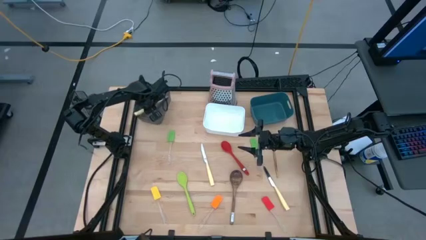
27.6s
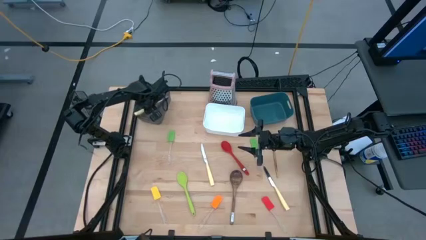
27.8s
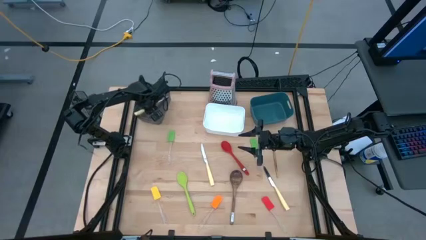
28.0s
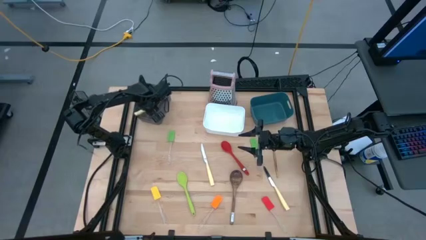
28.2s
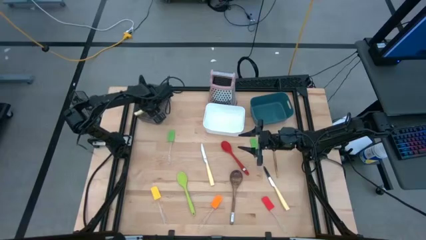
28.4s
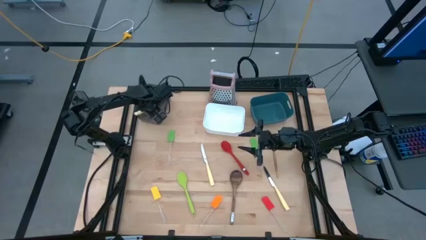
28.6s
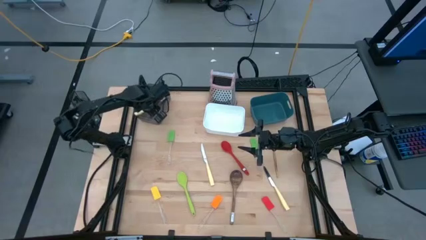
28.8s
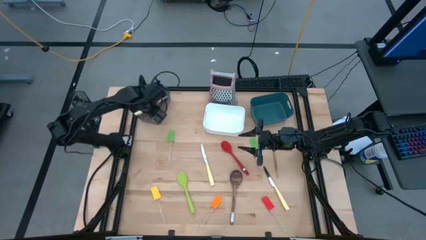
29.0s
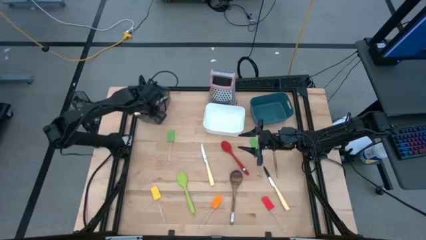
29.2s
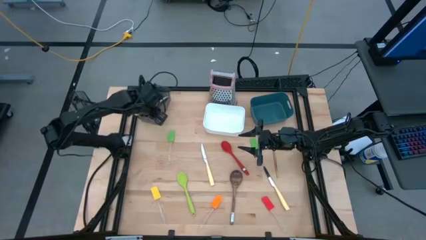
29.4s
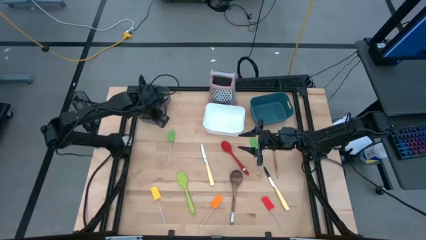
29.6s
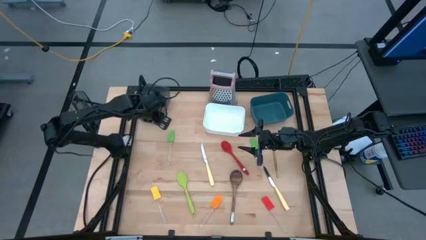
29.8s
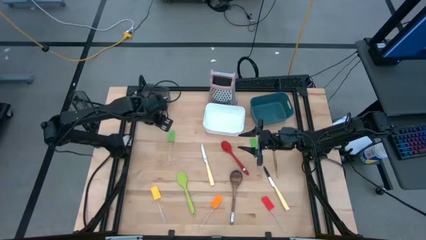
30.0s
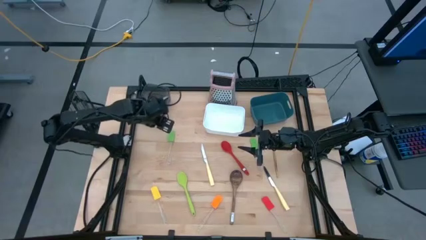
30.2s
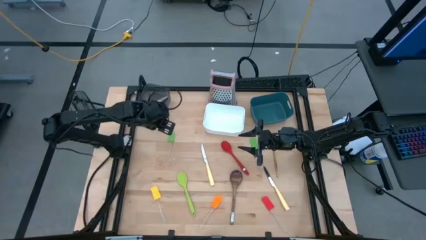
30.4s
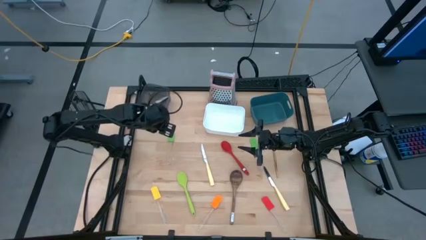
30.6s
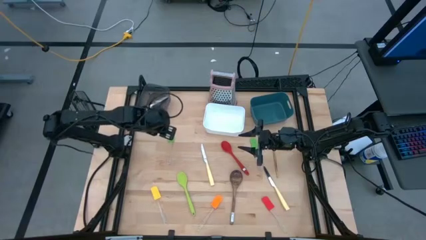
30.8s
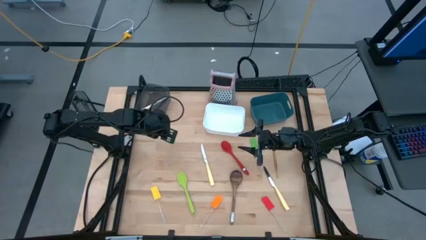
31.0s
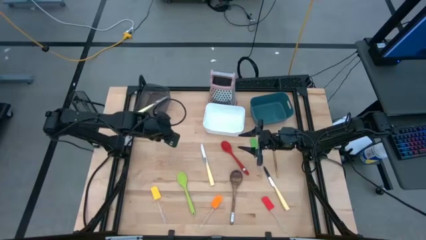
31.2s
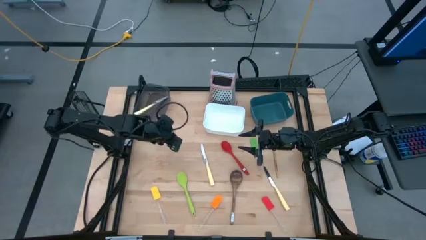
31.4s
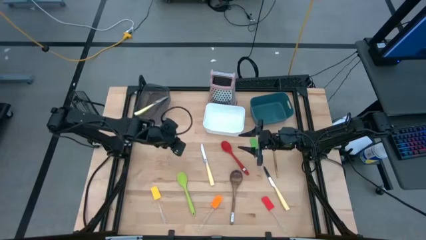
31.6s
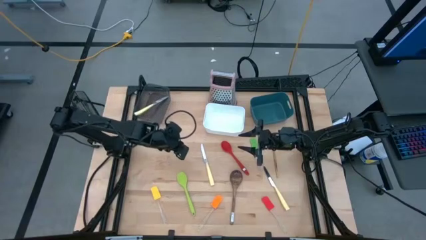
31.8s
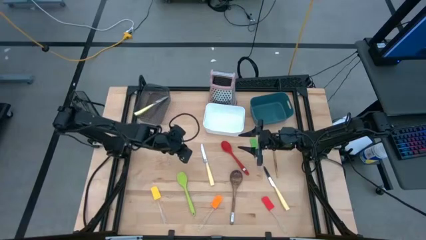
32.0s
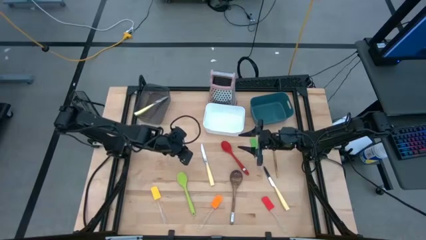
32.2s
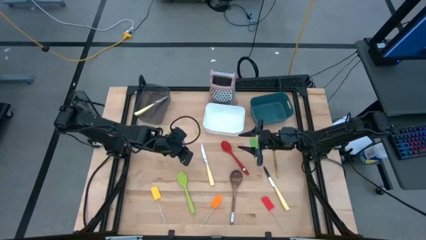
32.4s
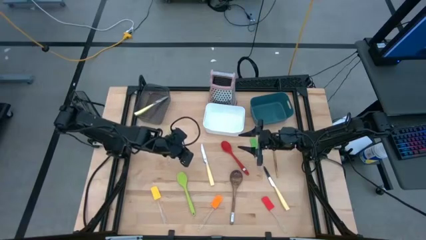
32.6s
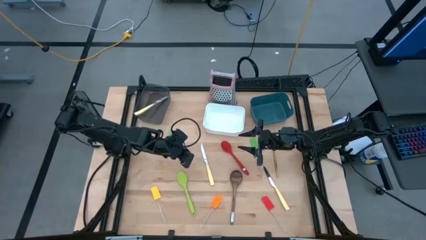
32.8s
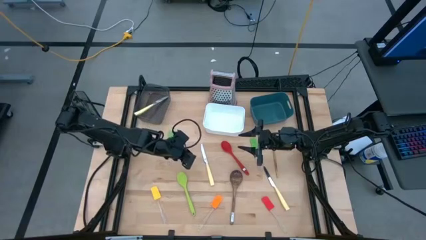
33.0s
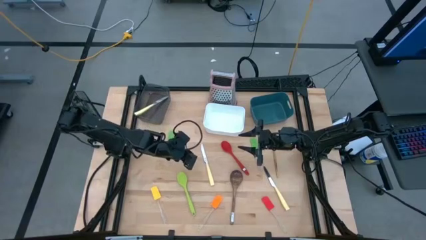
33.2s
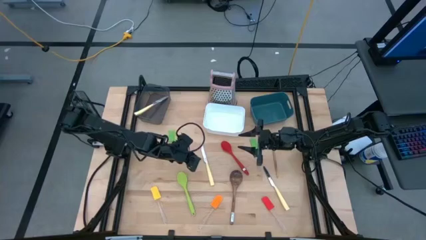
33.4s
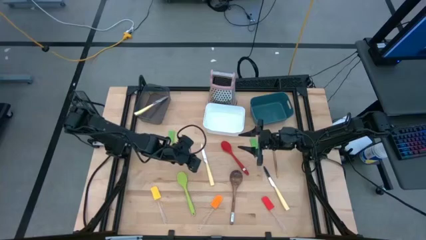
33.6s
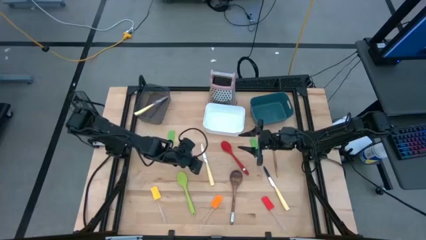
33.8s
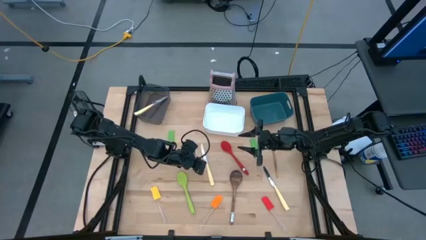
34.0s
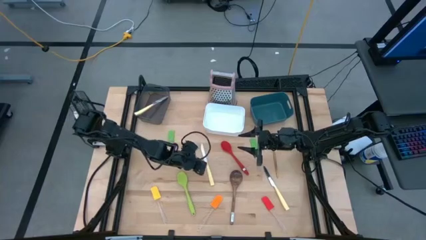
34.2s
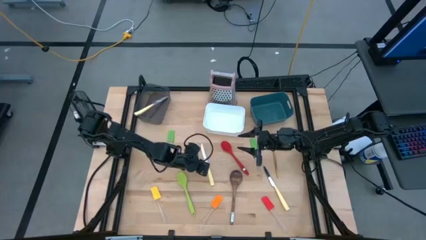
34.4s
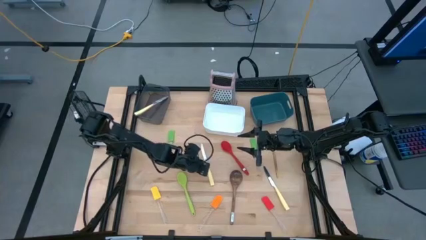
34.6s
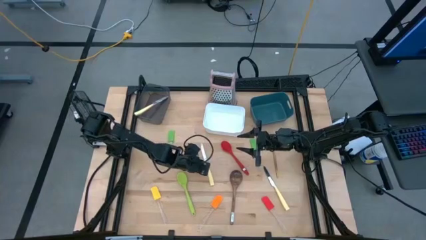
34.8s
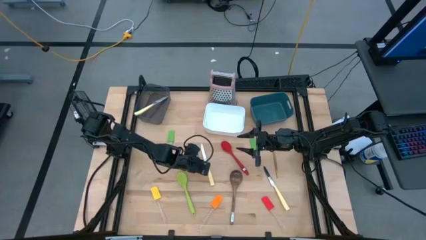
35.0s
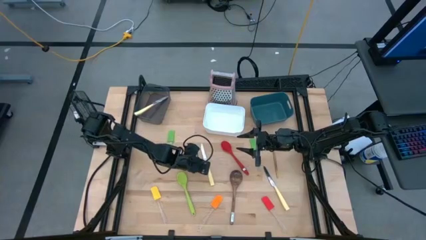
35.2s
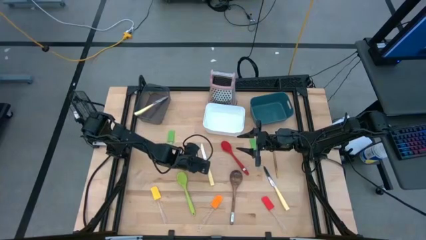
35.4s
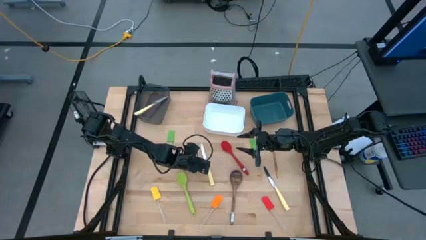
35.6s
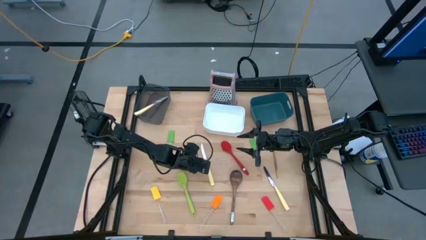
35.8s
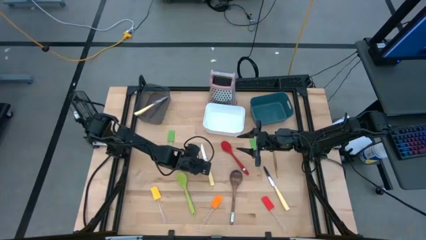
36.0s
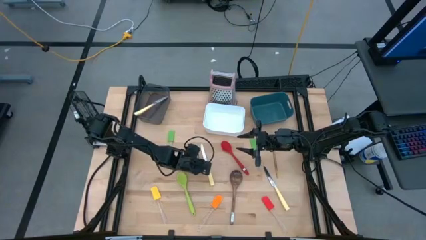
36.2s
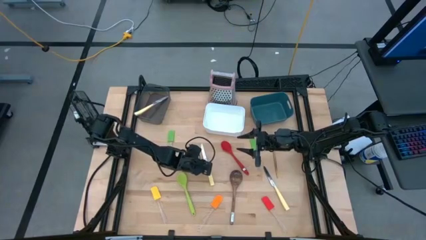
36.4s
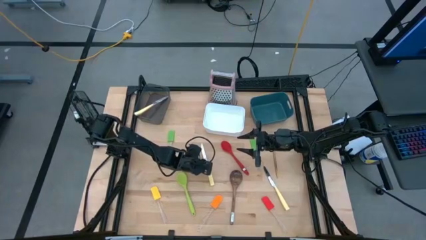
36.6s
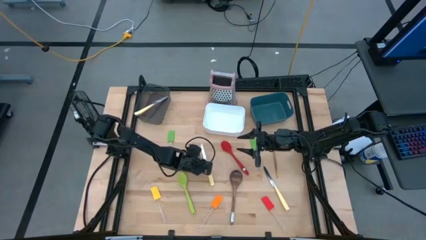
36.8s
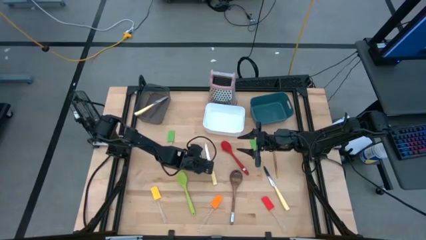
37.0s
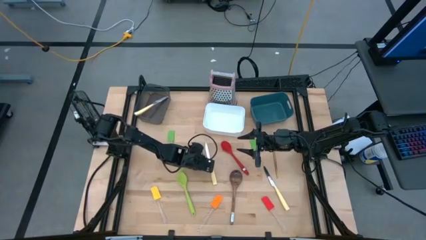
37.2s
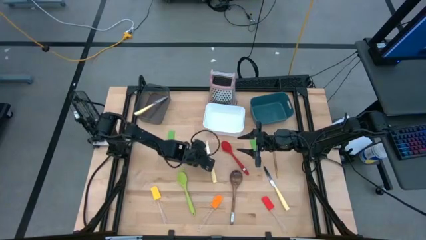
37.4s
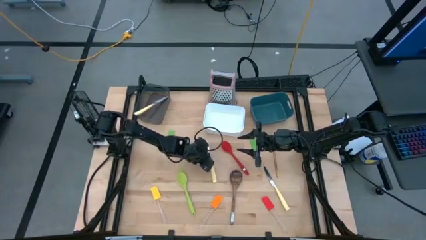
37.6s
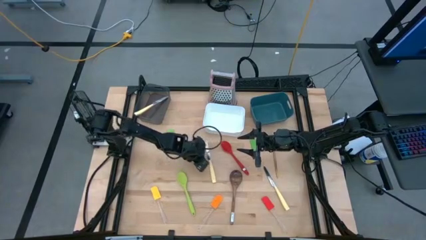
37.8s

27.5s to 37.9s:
Task: Pick & Place Kitchen Items
Put the top yellow knife into the black bin

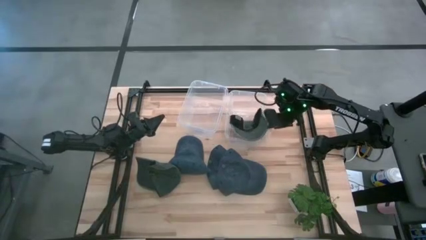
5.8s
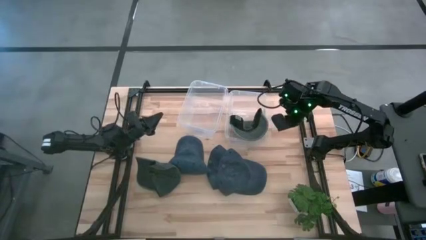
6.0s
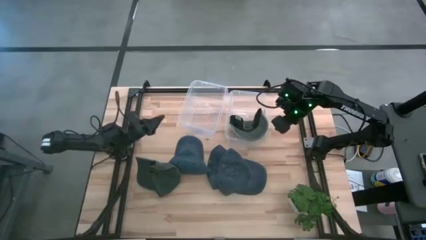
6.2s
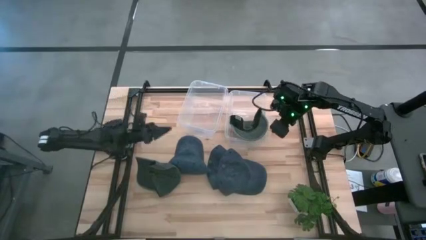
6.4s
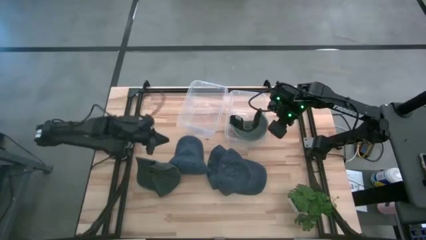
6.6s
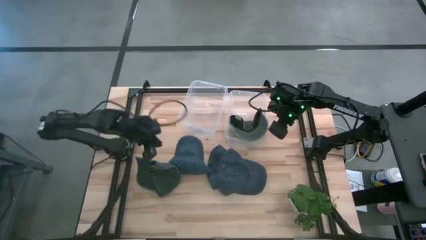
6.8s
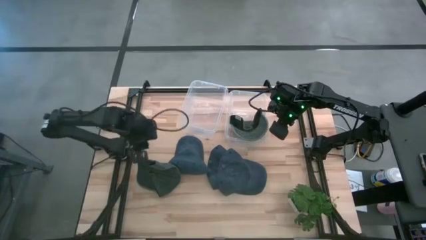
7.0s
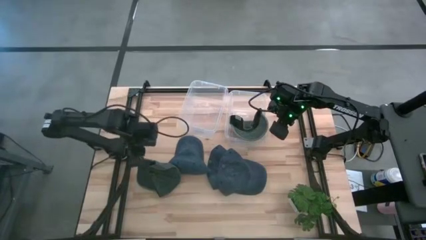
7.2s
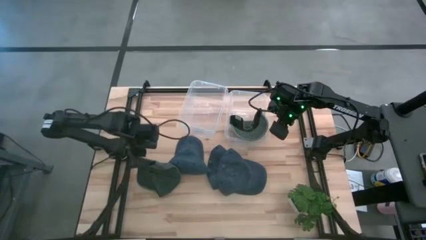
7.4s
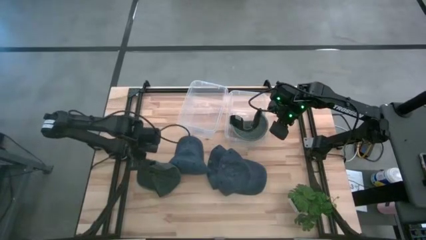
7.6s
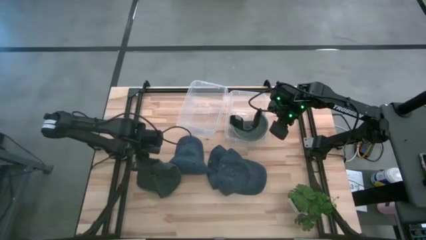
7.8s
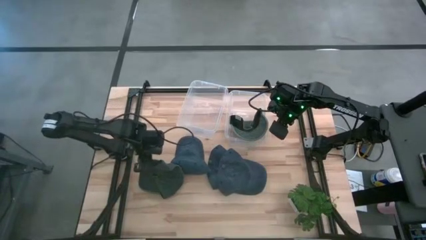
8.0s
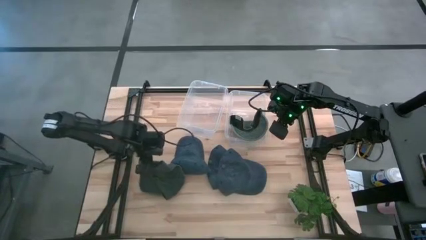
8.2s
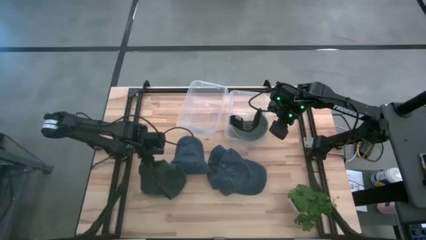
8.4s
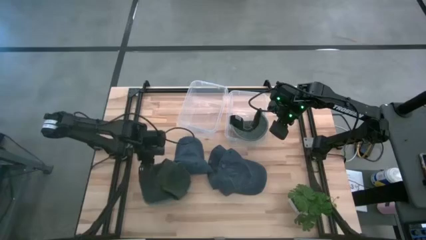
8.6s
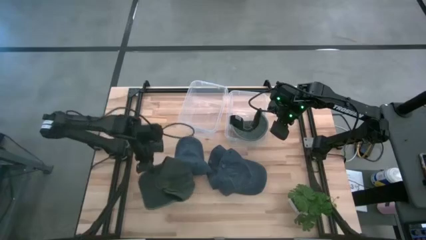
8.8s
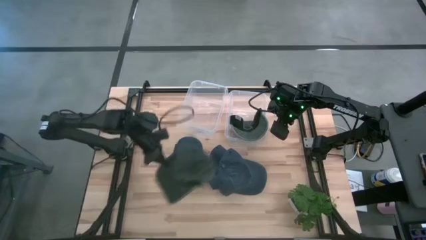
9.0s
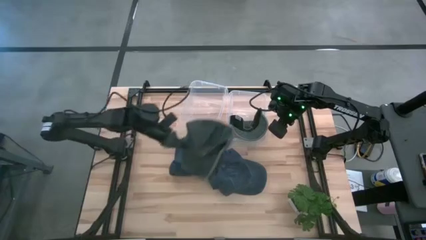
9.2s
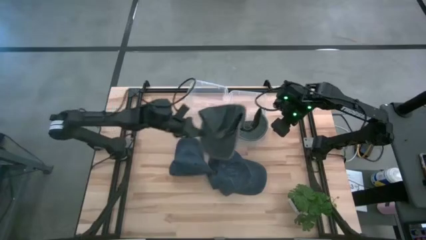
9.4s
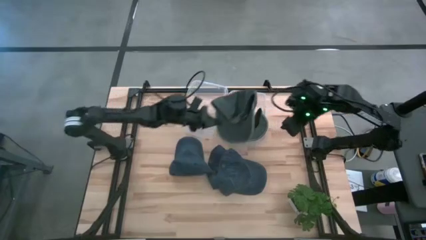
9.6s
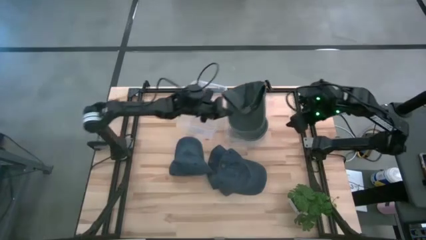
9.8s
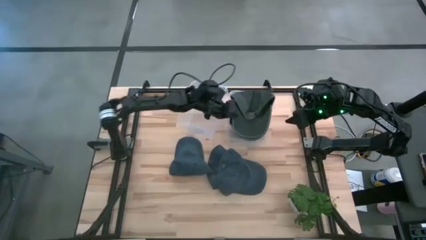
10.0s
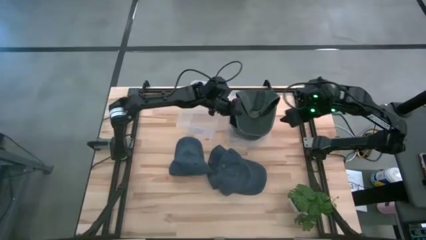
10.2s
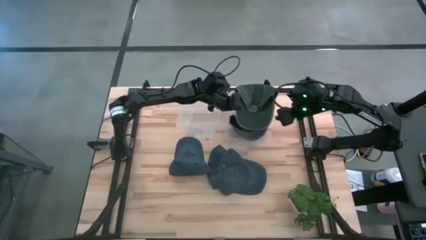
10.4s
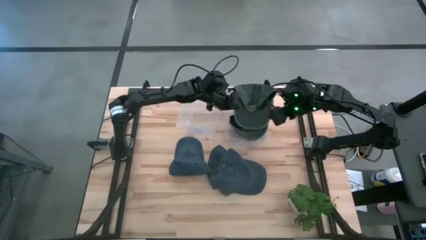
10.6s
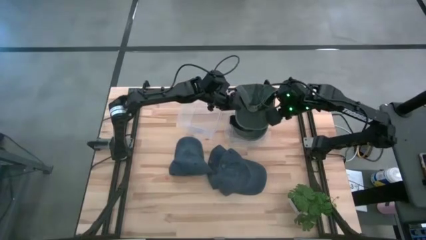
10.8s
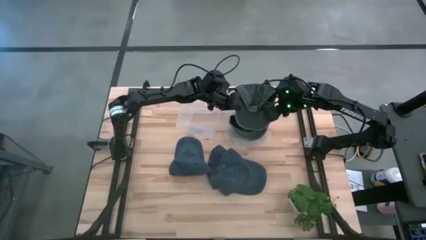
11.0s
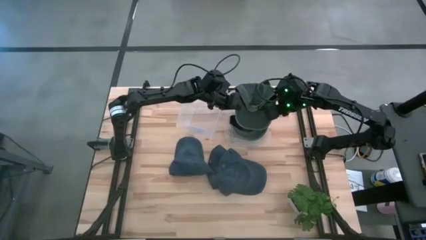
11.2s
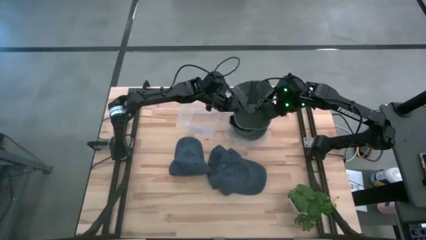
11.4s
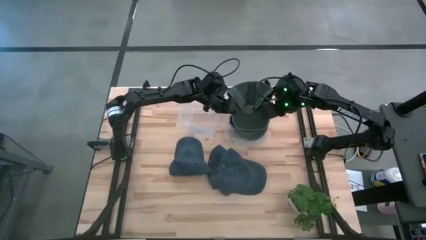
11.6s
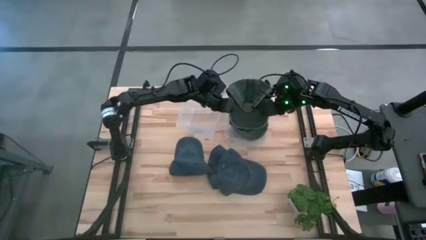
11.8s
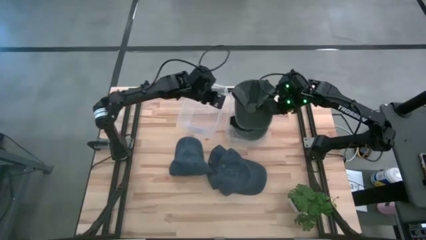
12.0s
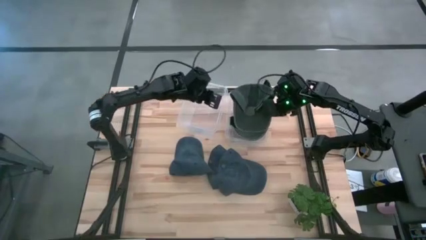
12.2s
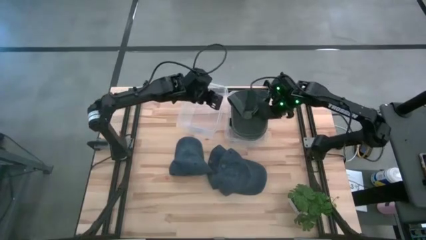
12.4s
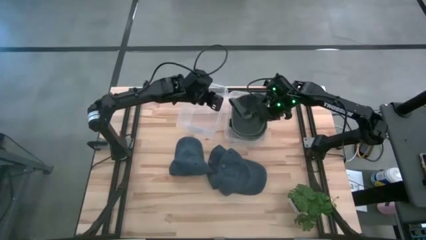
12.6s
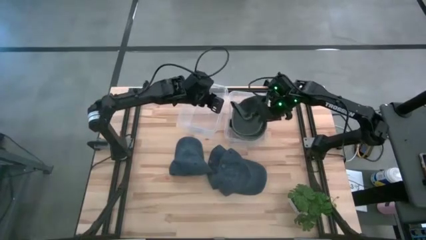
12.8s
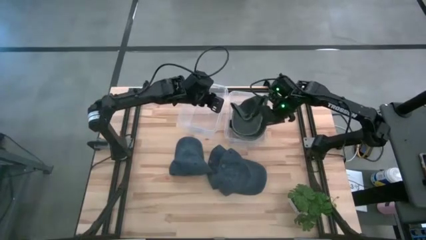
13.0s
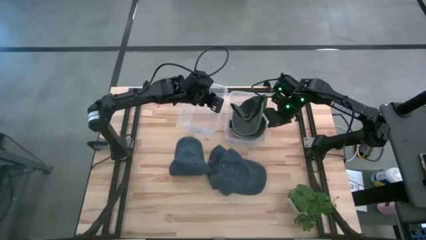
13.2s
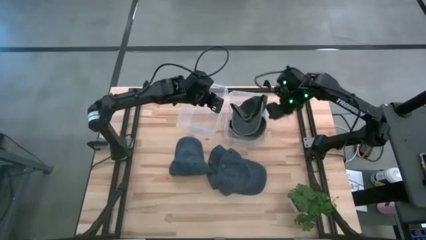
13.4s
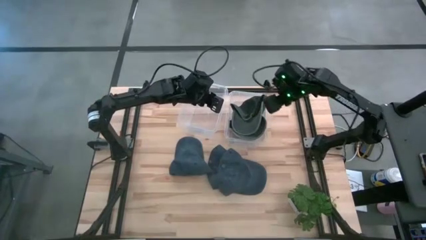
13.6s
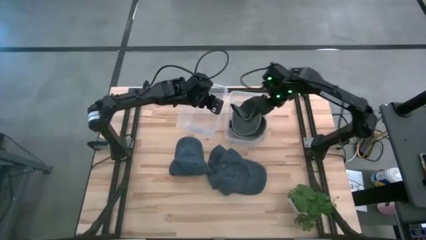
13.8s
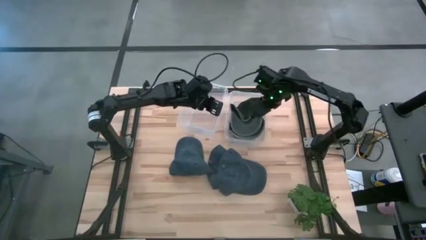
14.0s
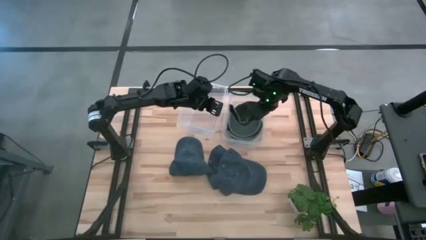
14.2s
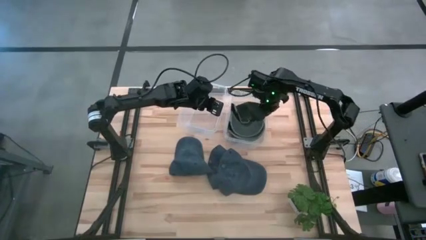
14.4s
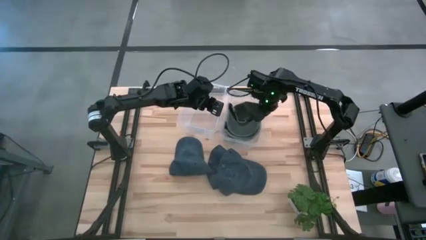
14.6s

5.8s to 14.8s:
Task: Pick & Place hat
Put the green cap into the right transparent bin
